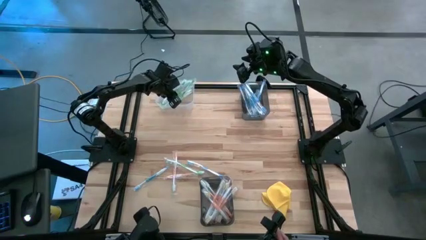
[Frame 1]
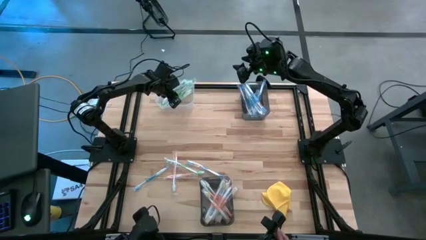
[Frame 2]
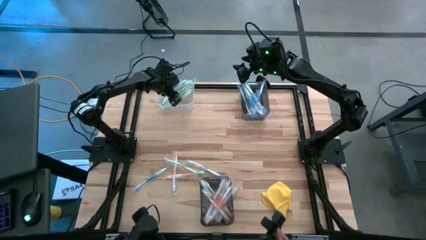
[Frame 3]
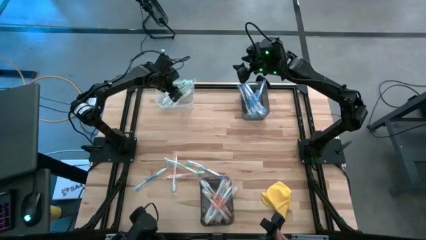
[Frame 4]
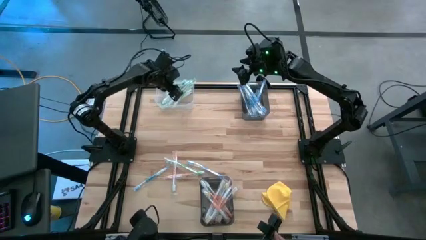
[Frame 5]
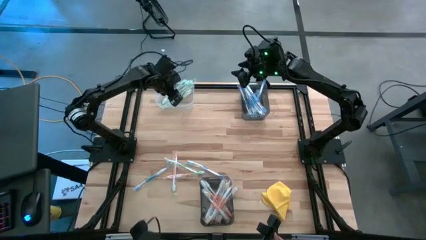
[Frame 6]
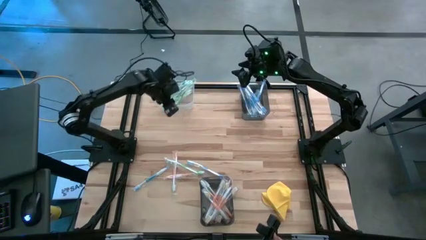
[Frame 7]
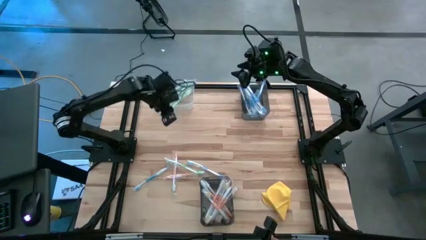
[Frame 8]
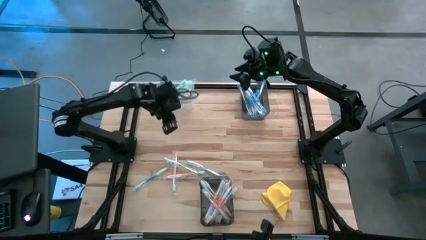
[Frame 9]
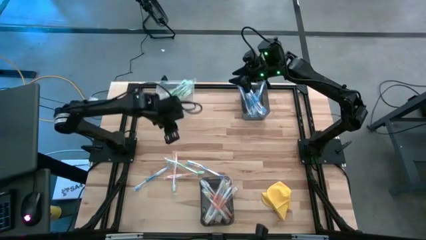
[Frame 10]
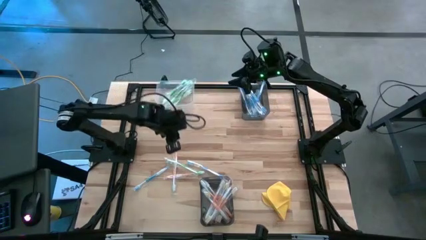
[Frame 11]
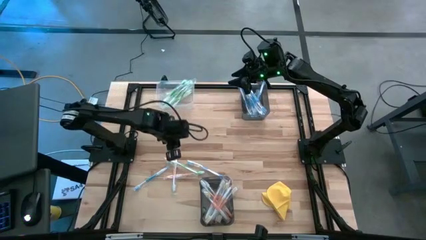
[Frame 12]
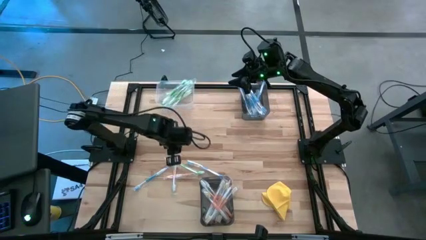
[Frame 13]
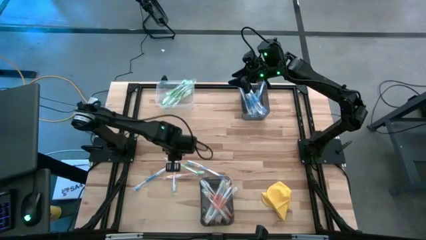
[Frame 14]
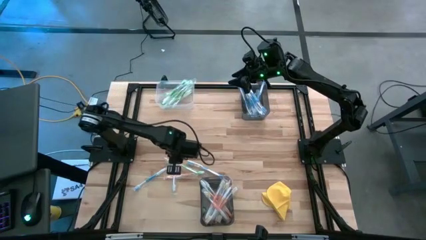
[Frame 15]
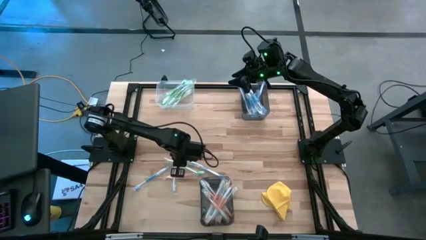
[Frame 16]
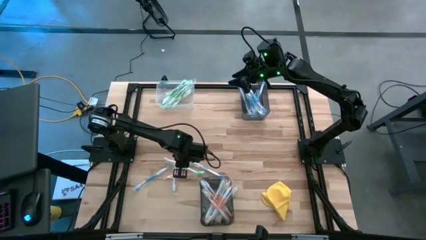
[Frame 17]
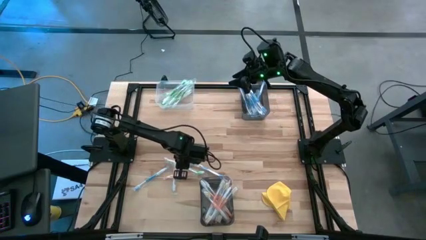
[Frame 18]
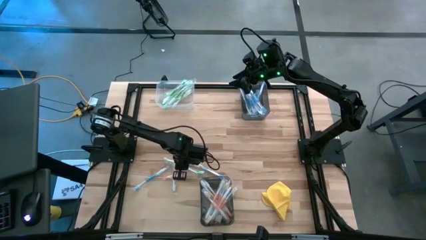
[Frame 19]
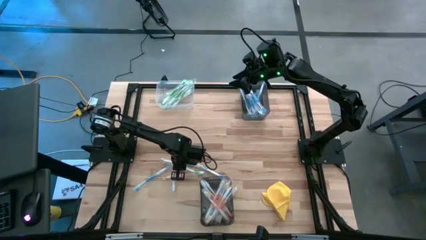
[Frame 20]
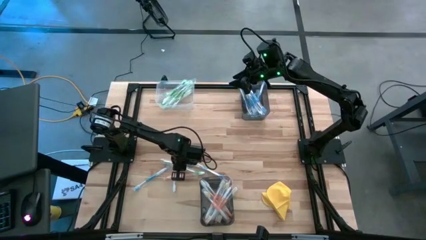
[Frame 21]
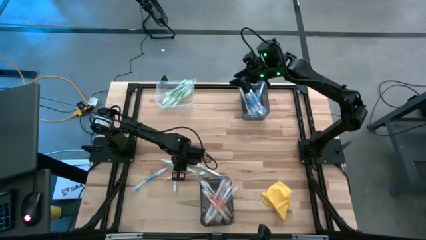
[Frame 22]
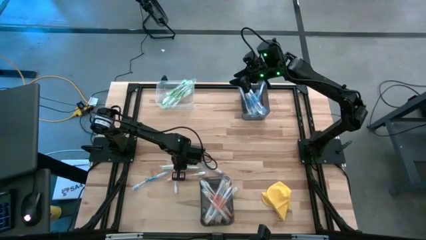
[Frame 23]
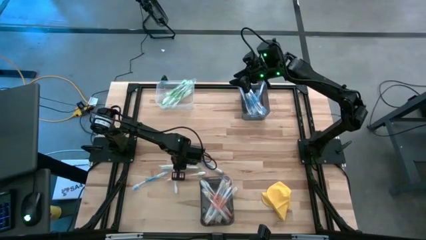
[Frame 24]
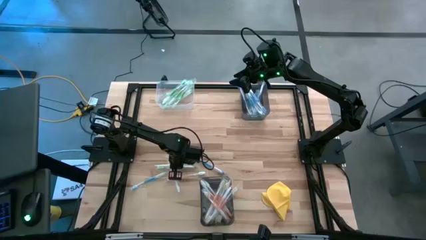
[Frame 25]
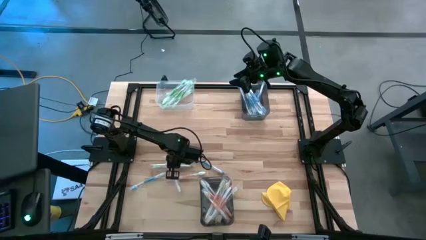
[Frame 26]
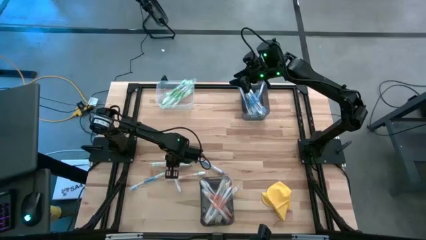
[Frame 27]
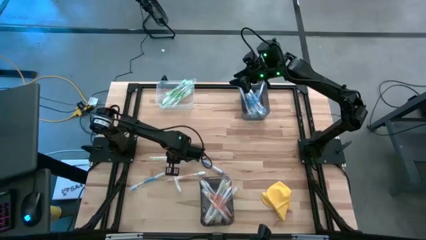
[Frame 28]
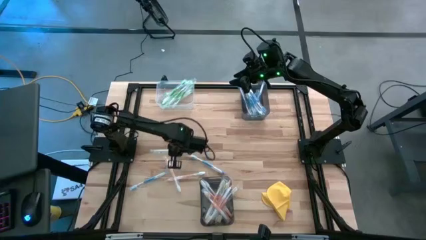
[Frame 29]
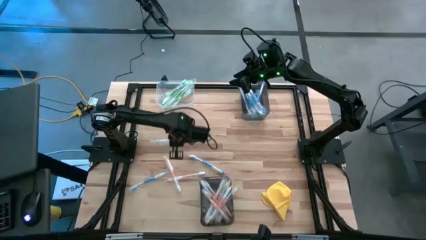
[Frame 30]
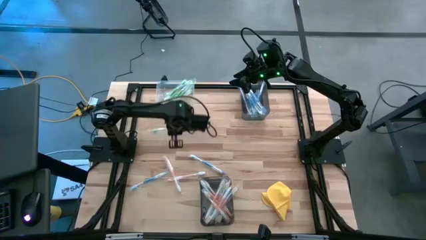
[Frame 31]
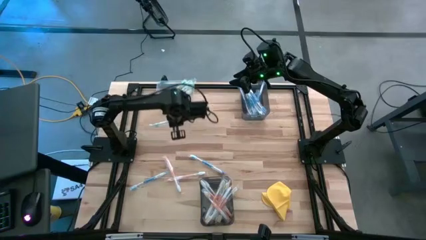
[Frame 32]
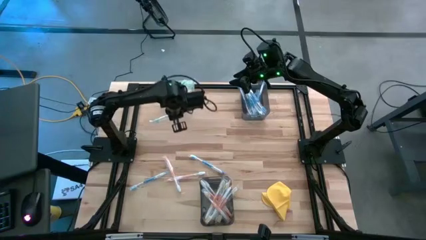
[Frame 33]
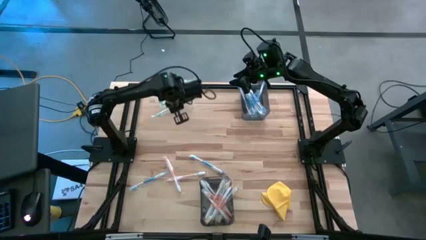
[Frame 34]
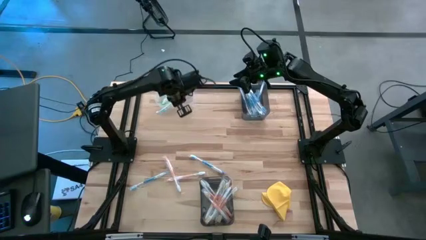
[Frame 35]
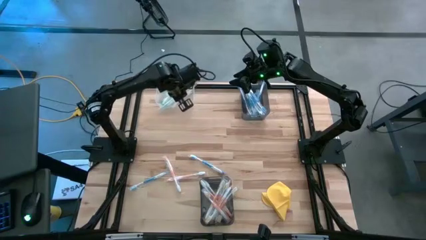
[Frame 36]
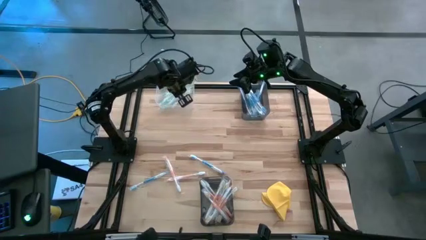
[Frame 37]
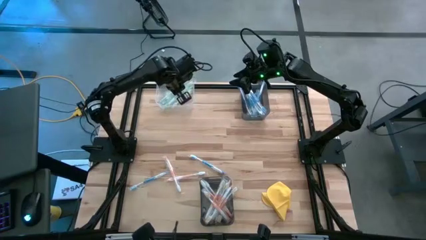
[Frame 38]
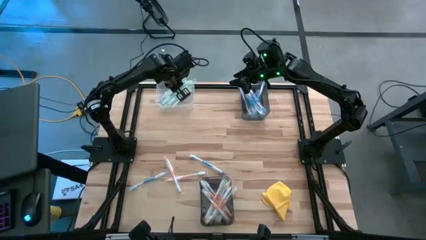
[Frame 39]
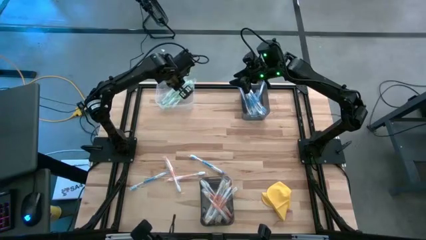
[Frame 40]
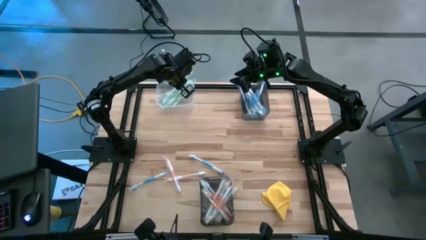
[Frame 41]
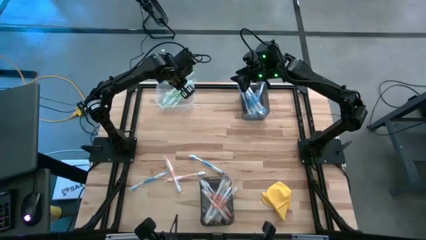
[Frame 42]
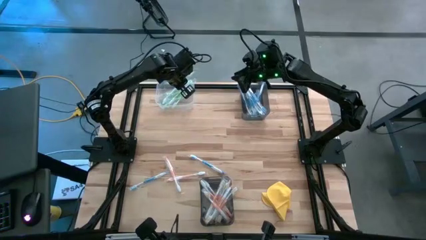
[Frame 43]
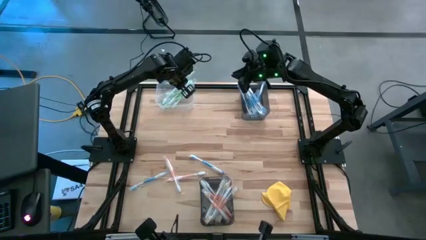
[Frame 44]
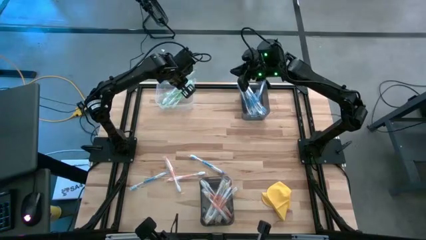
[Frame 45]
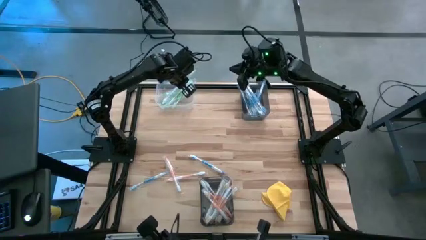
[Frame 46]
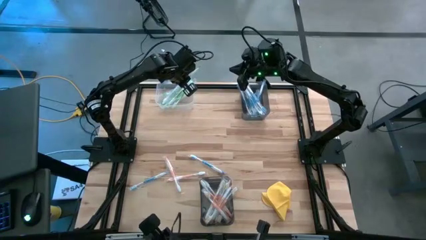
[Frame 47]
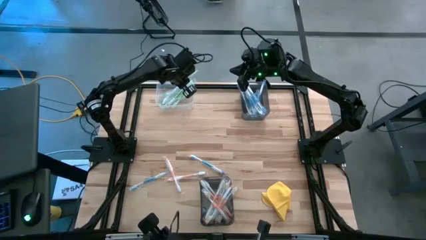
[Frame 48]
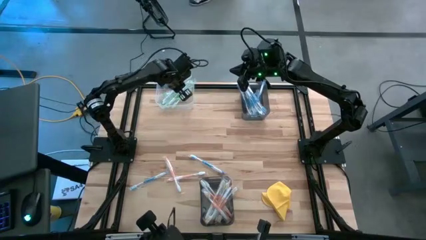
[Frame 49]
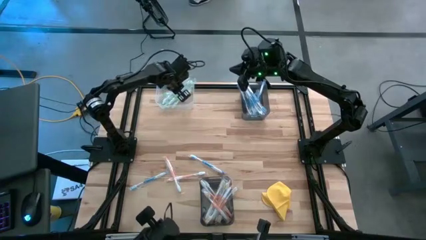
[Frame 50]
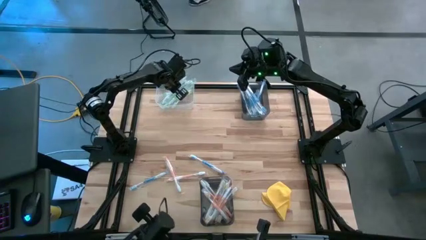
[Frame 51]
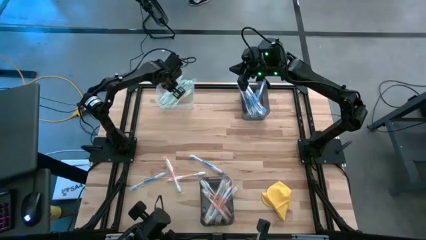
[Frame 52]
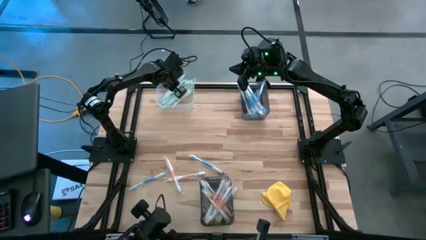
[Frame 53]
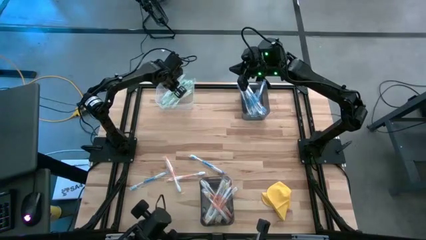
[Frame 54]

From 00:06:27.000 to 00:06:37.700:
Task: Pick & Place Toothbrushes
Put the green toothbrush into the transparent bin

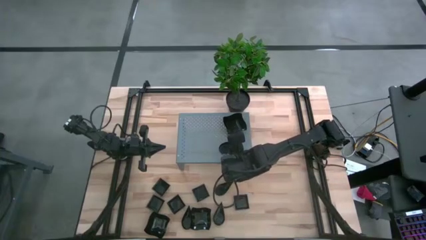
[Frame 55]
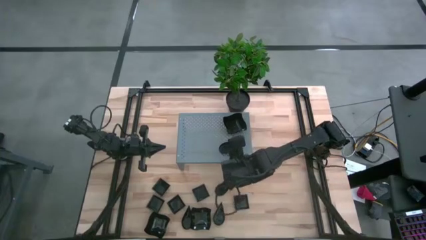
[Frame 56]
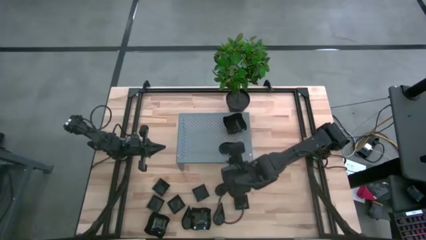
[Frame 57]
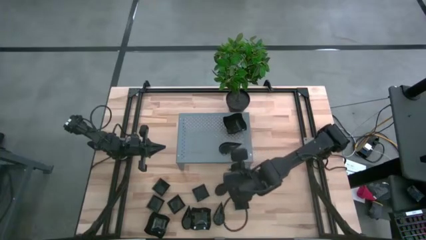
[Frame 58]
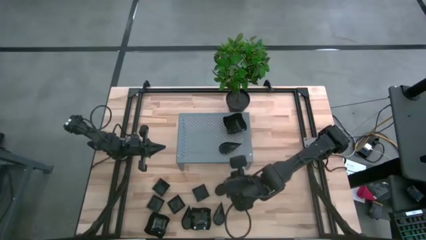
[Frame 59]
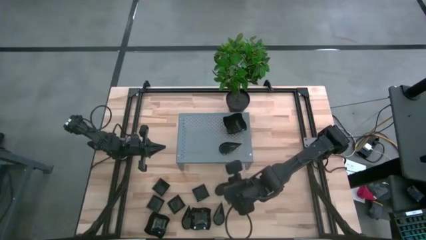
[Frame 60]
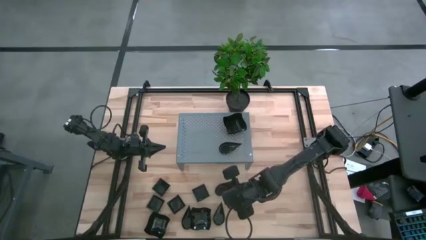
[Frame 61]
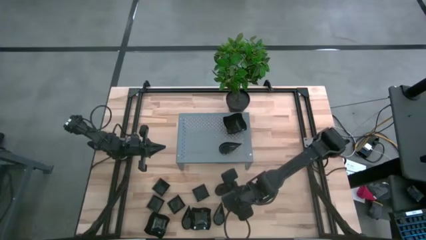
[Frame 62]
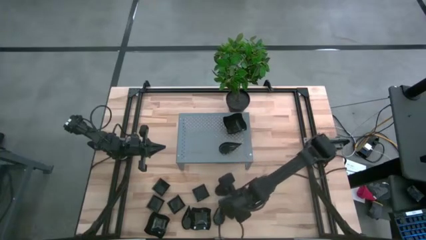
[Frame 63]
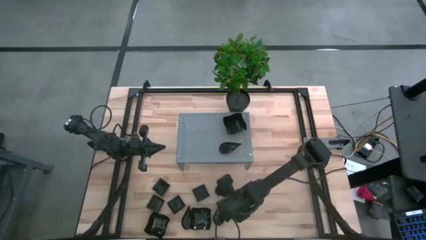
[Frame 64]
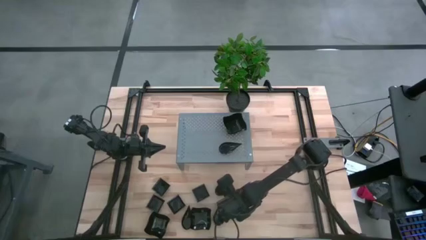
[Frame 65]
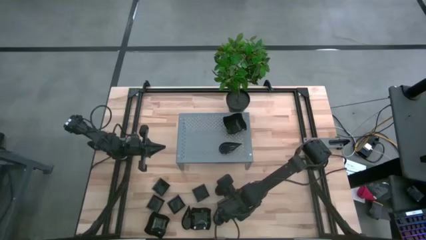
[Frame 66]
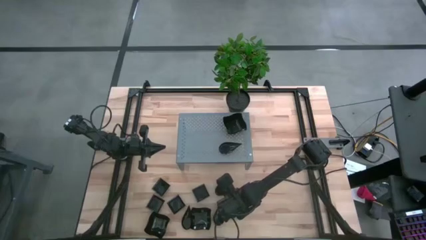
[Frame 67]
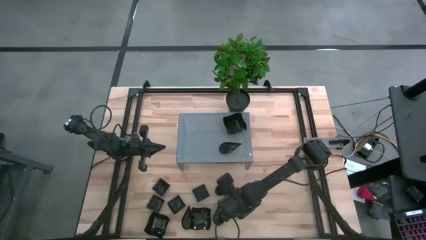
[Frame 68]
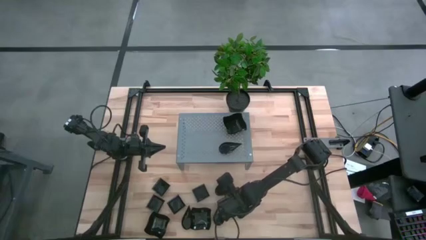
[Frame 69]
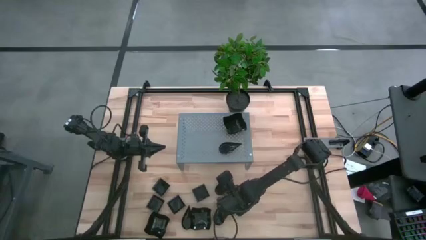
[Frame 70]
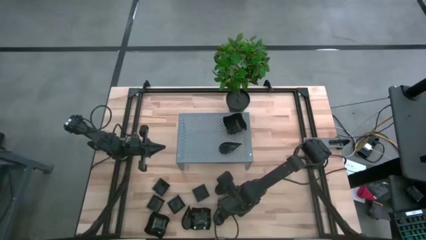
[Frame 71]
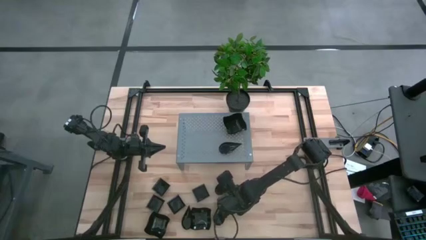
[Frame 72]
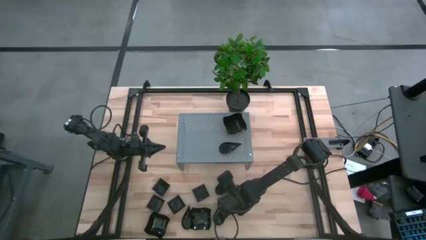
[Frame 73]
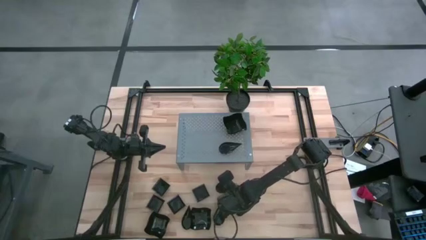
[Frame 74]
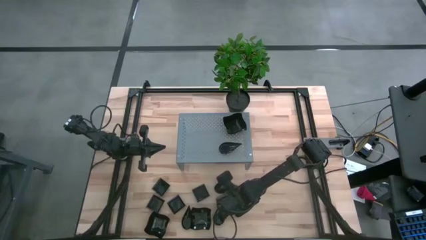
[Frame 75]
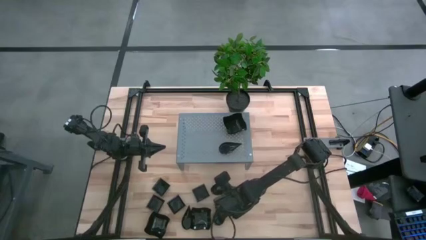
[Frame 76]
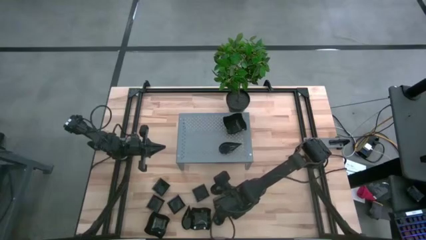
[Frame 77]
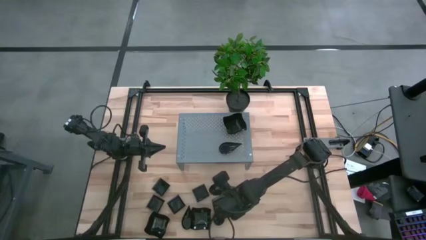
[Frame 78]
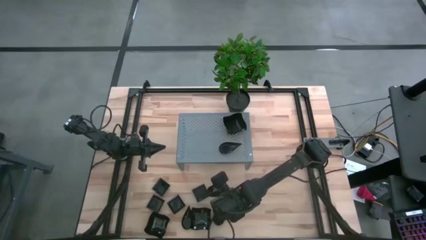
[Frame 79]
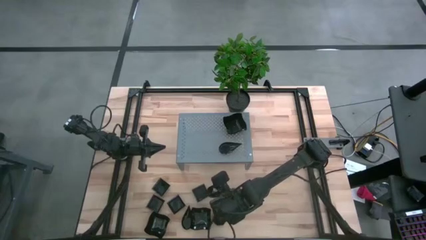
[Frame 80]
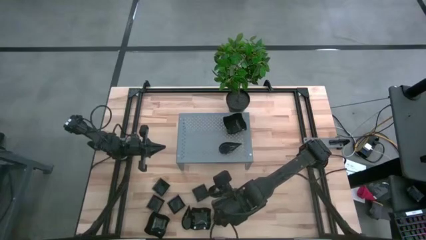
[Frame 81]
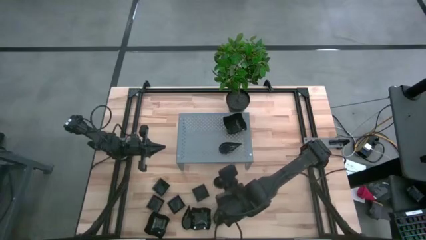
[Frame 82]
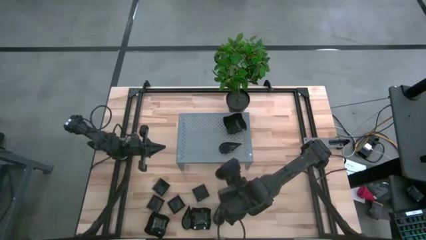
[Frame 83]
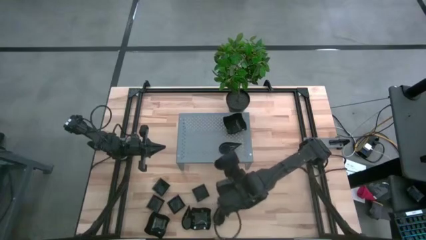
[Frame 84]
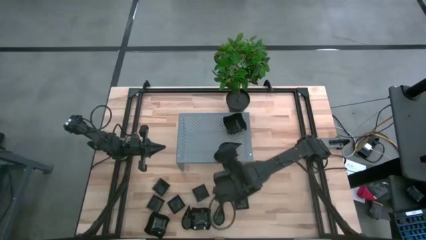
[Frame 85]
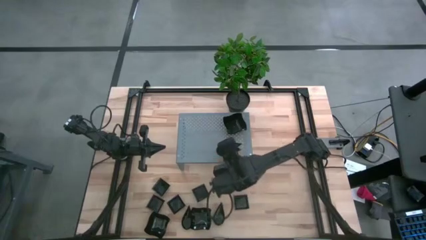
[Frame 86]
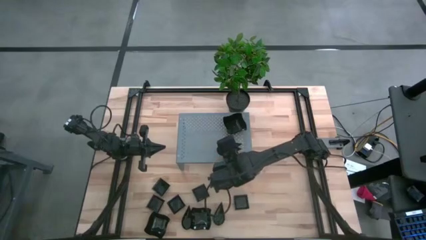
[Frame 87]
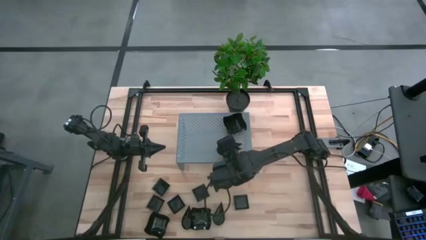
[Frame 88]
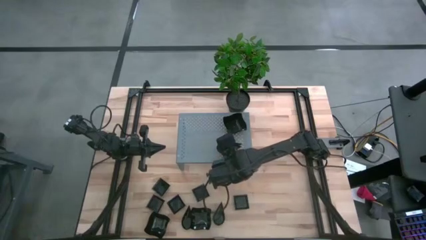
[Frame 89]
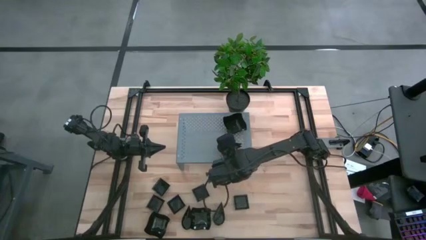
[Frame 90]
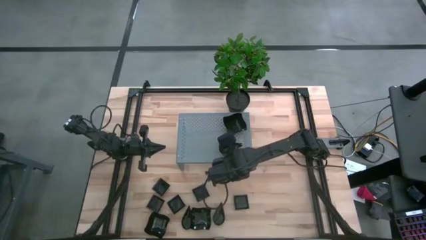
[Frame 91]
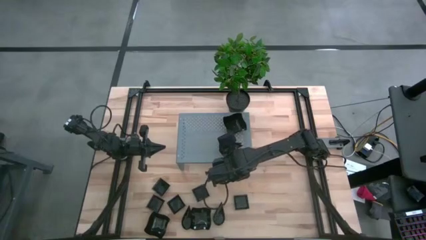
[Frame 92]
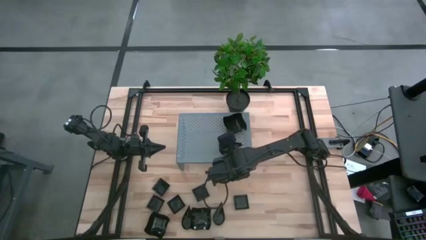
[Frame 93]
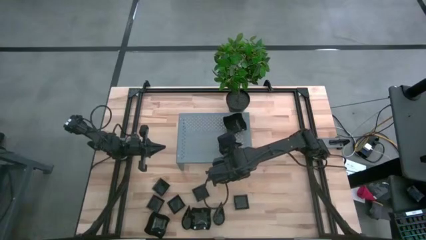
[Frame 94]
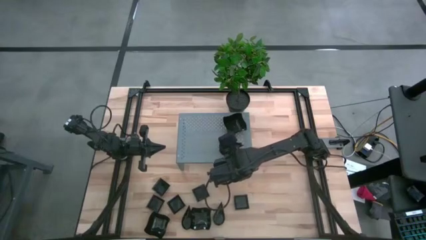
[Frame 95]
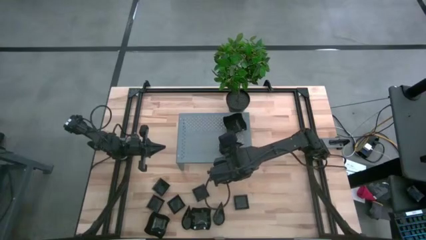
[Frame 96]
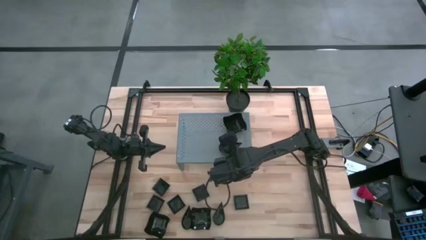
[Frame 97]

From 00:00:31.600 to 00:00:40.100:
Task: Pick & Place Mini shaped plates
Stack the black drop-shaped plate on the black drop-shaped plate on the shelf
